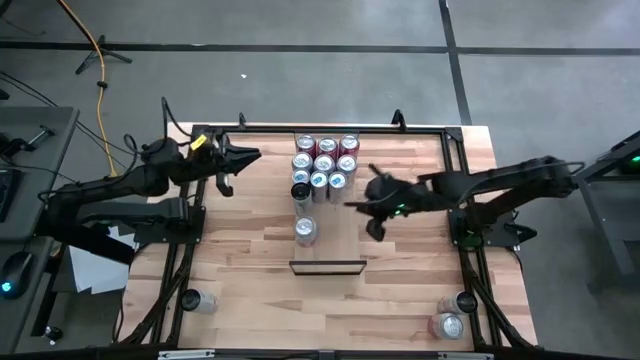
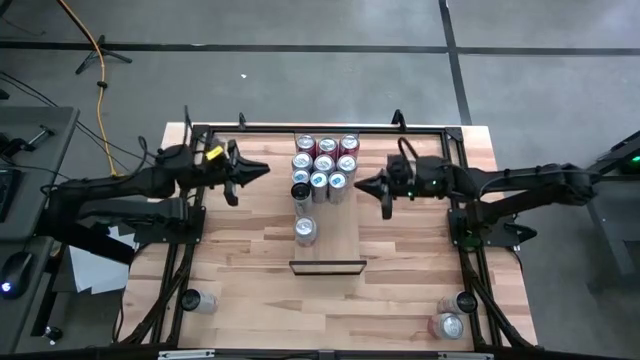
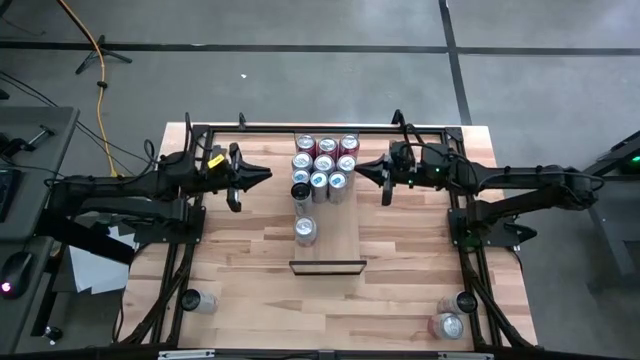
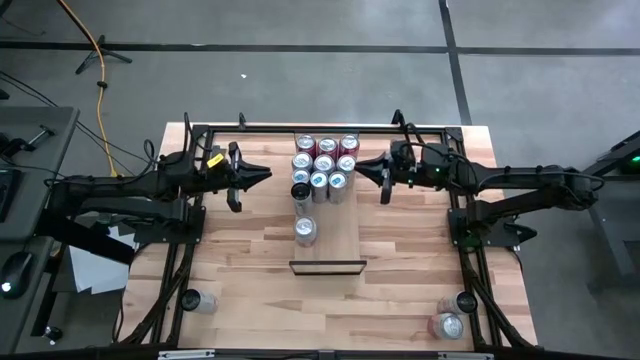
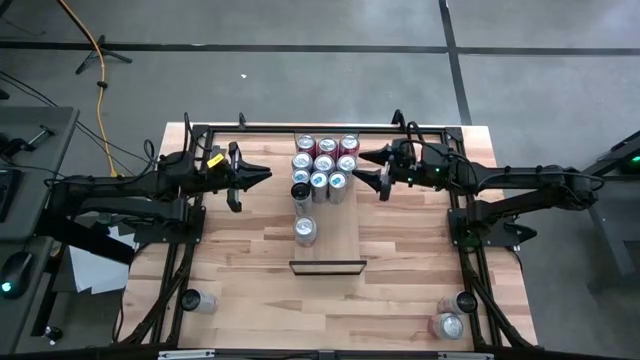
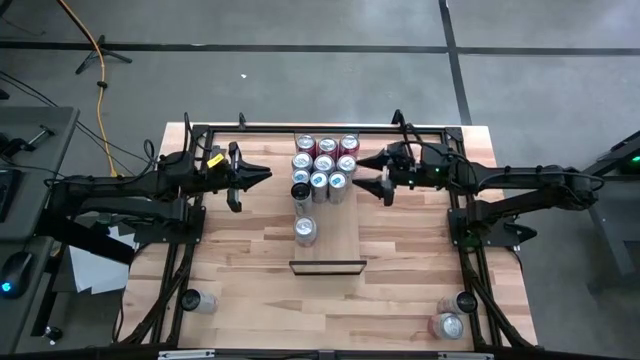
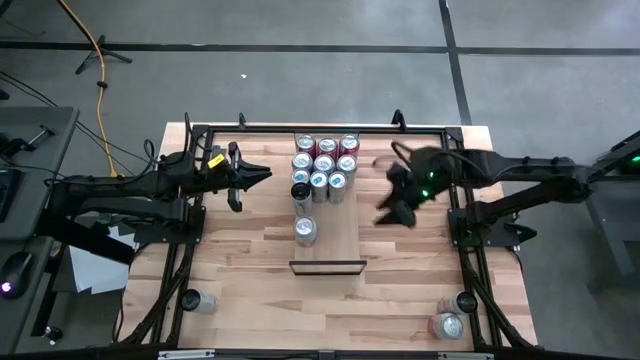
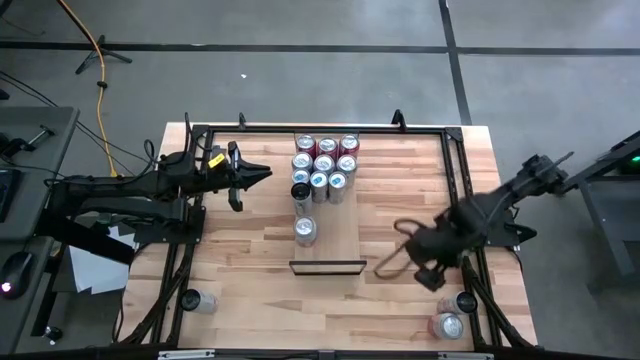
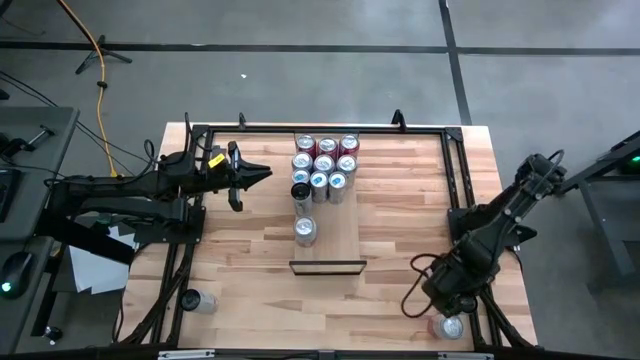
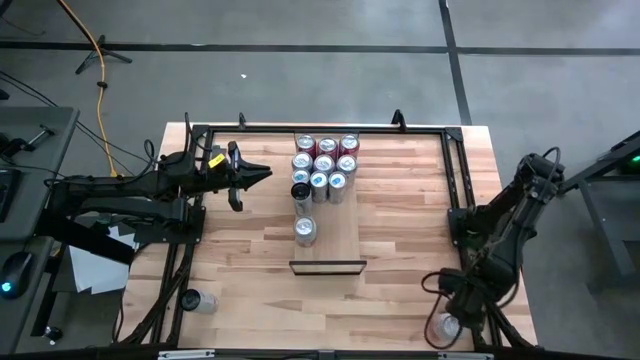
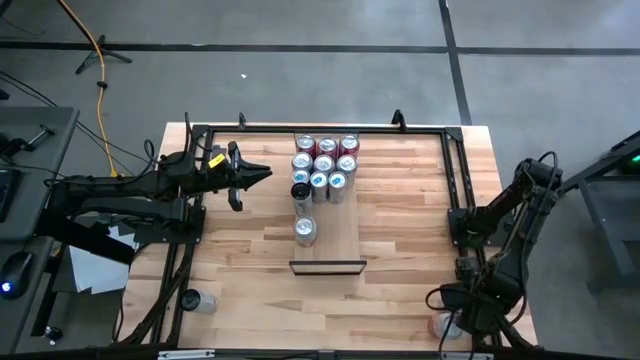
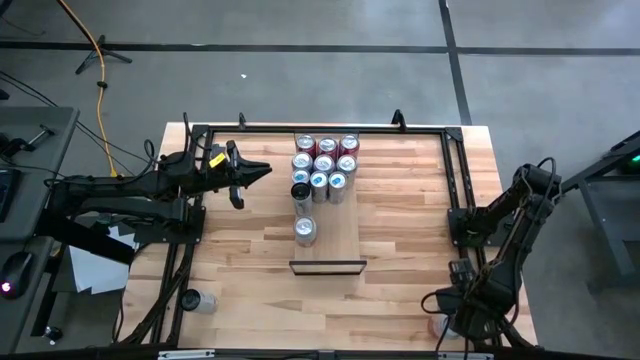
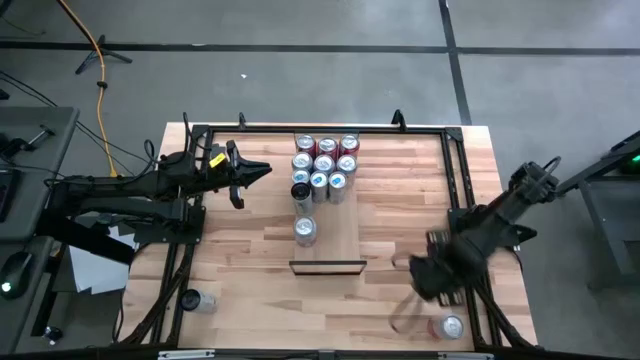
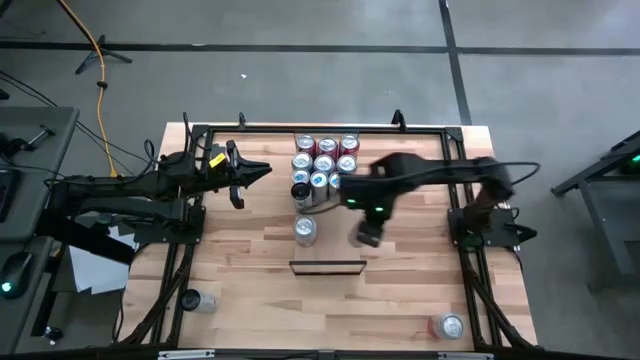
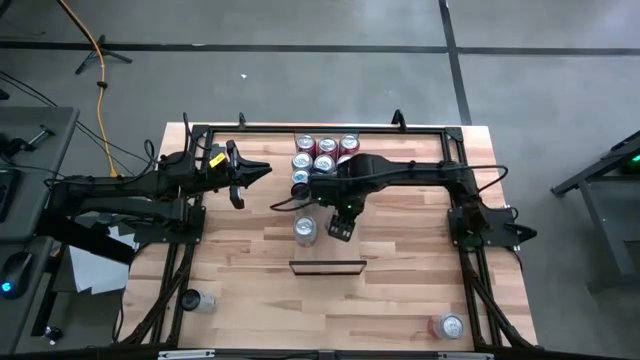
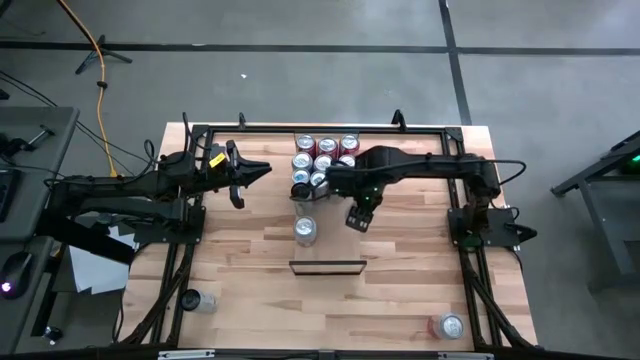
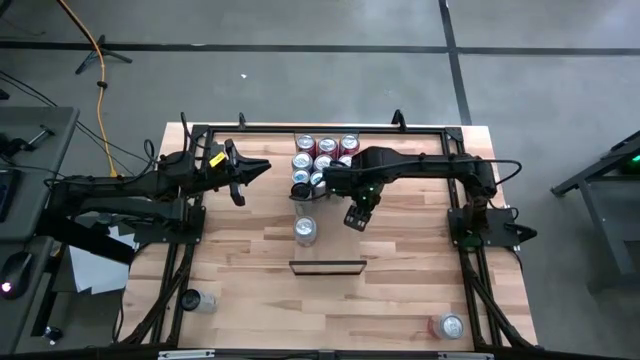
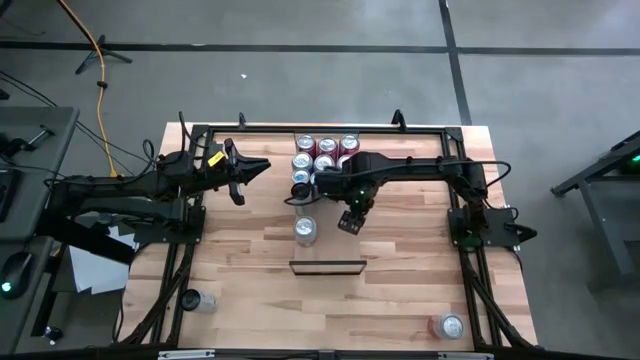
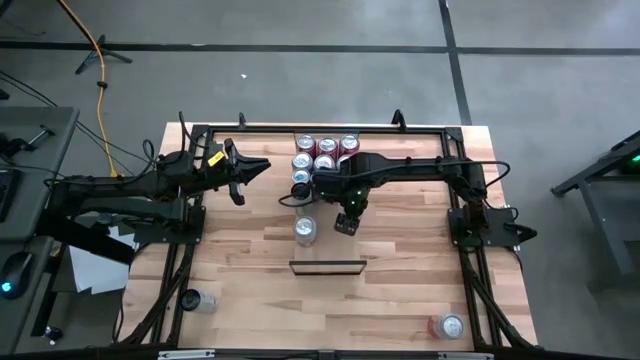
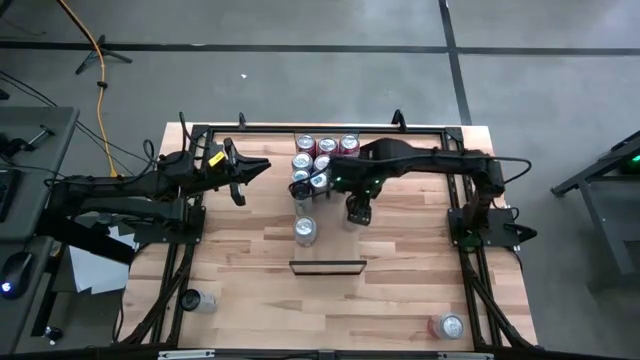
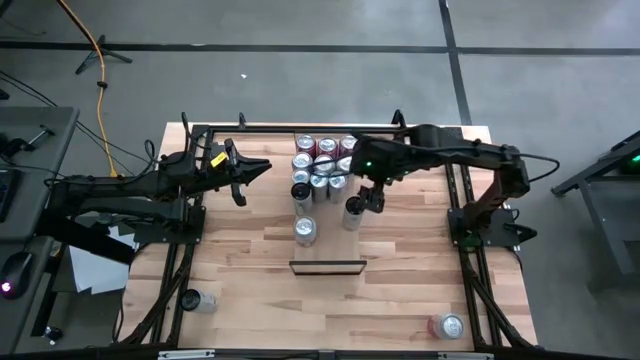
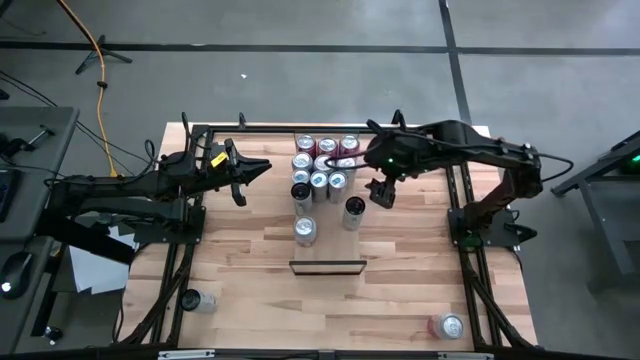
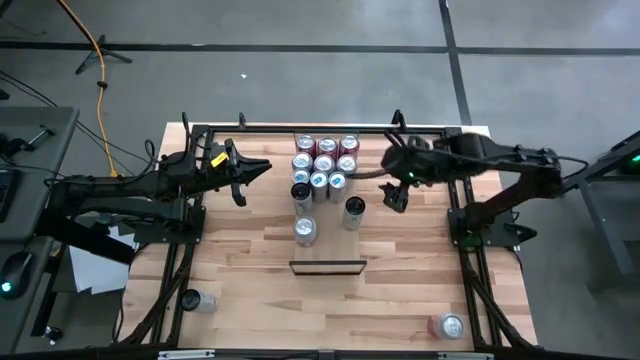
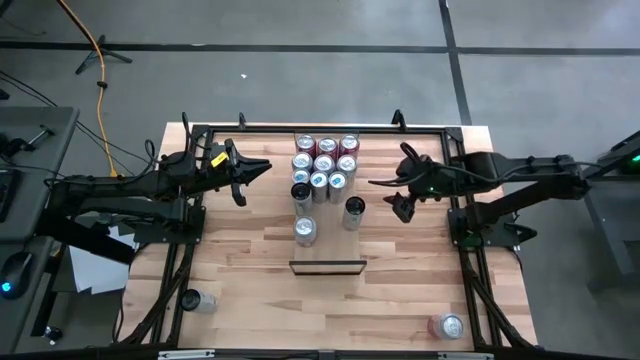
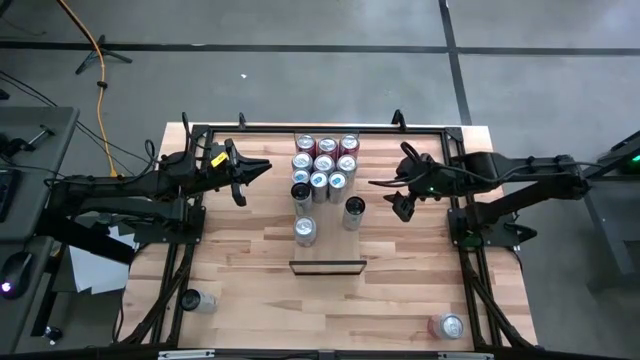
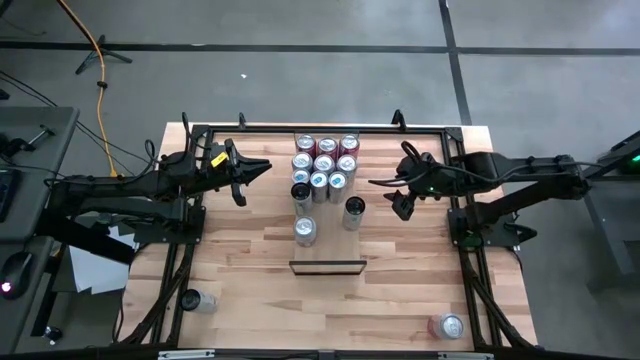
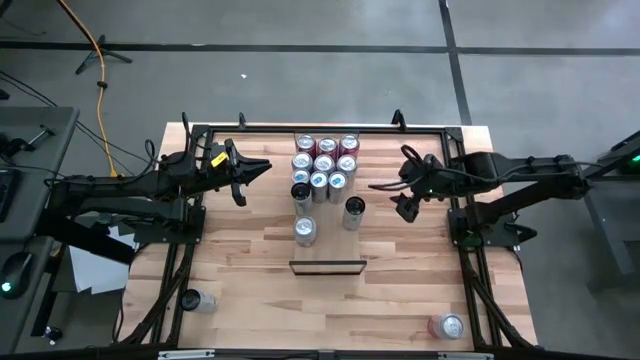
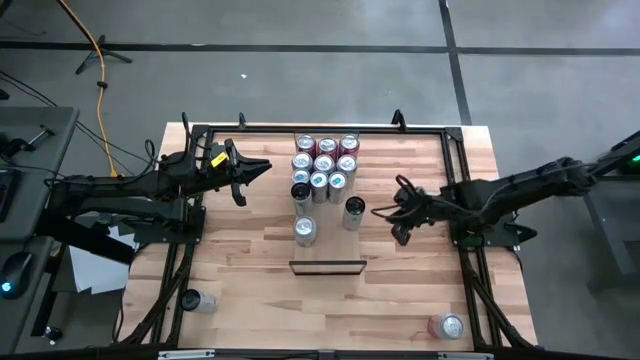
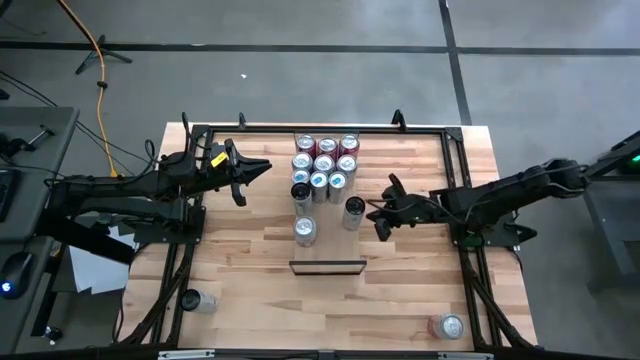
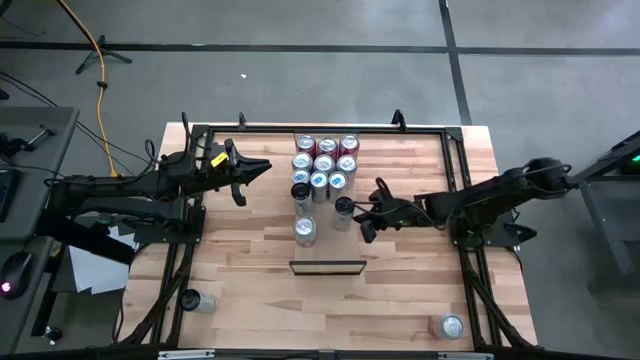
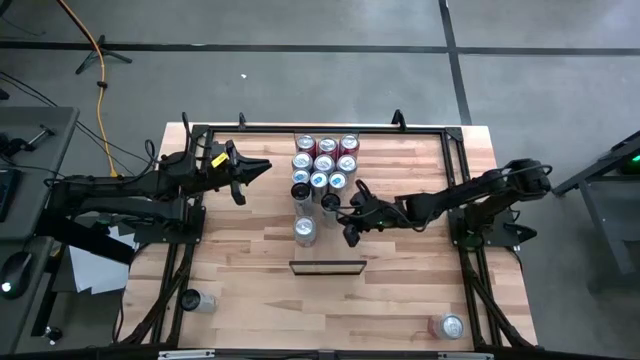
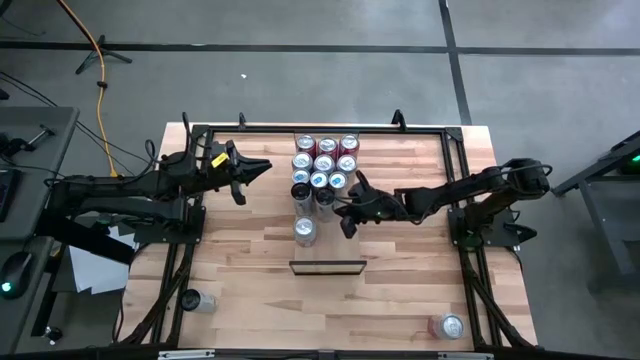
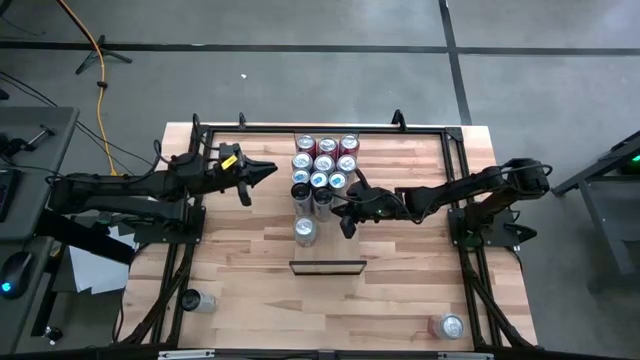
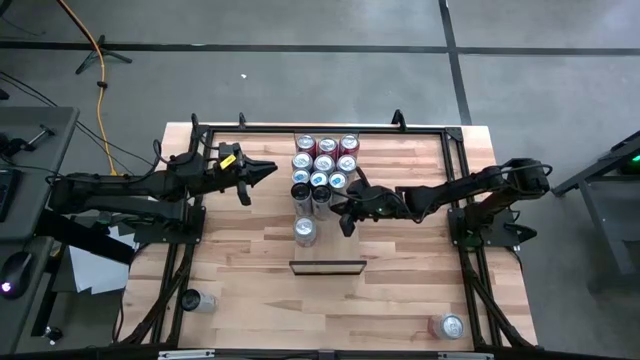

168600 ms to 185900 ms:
Task: Place canned beverage on shelf
Put the right white pink soda can on the shelf aligned with the other white pink soda can

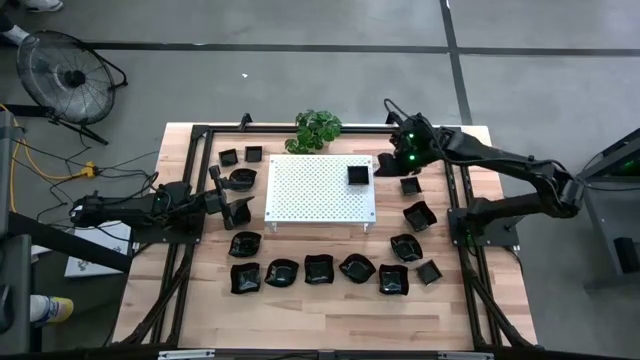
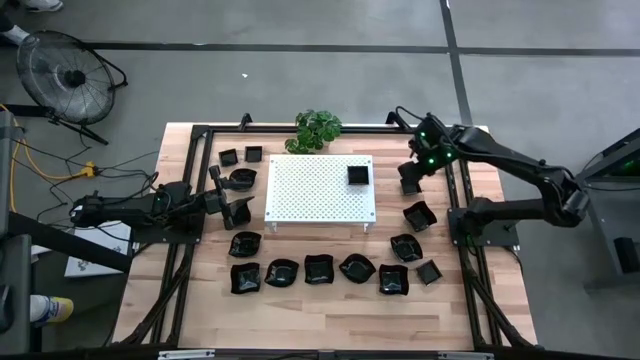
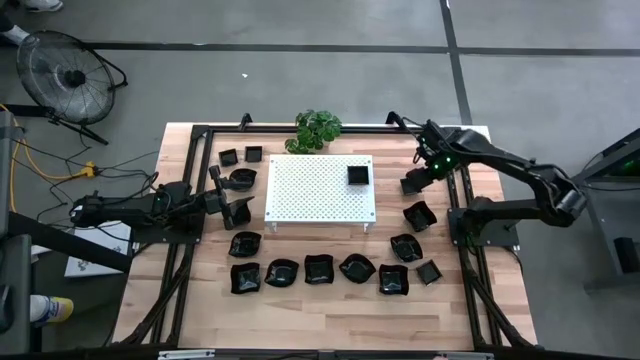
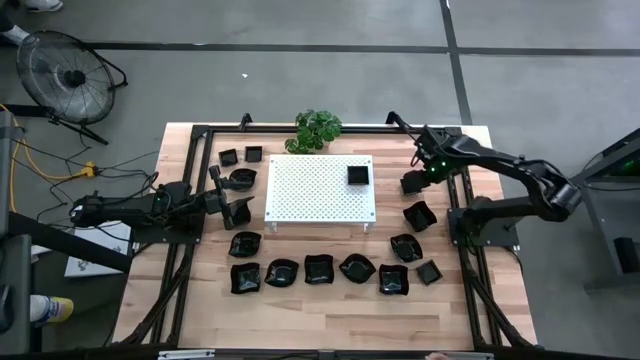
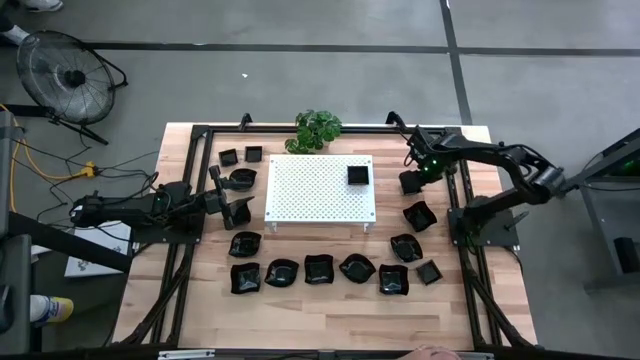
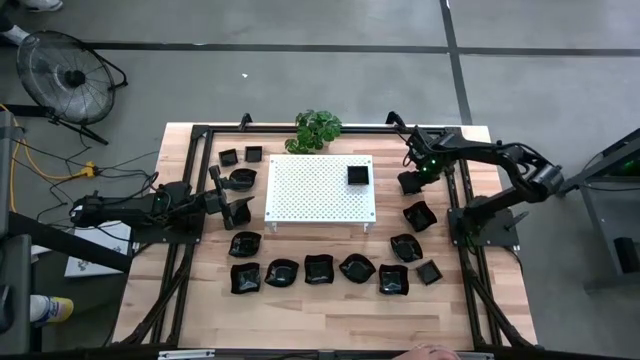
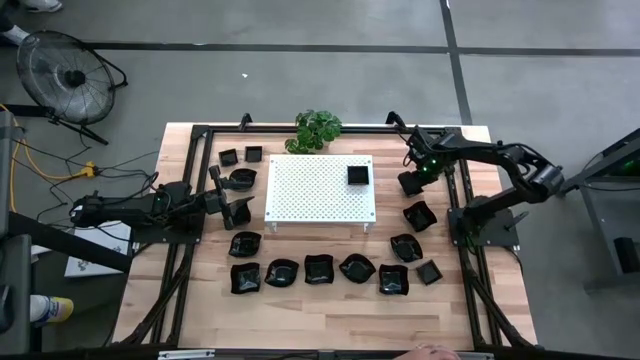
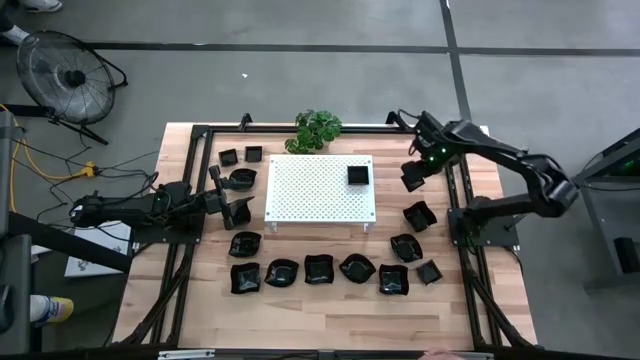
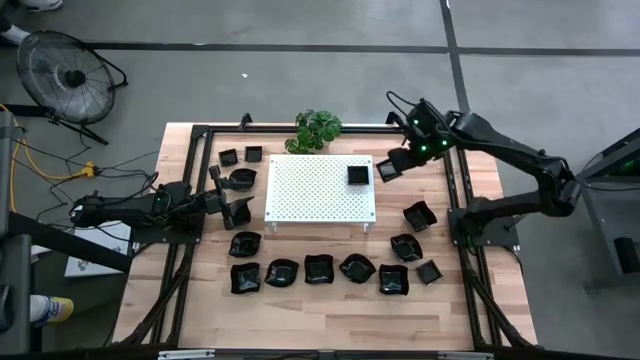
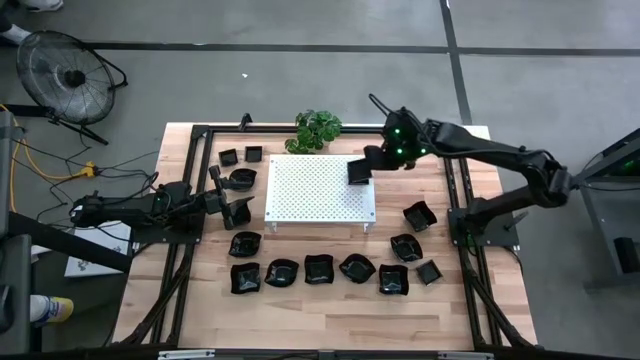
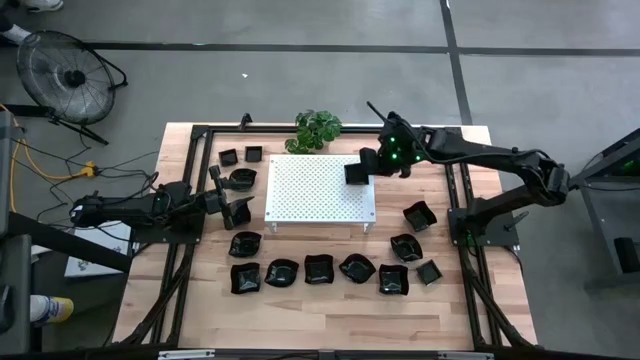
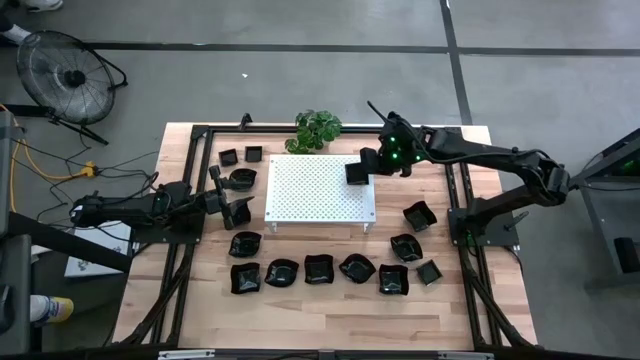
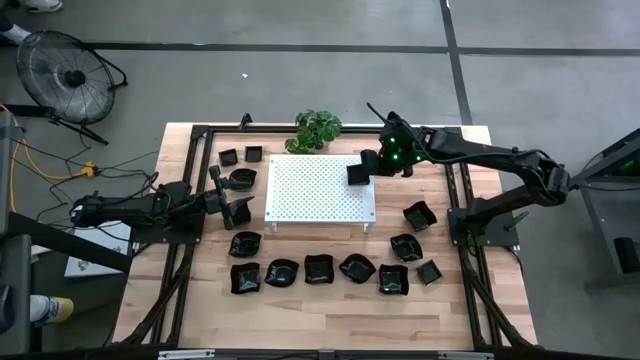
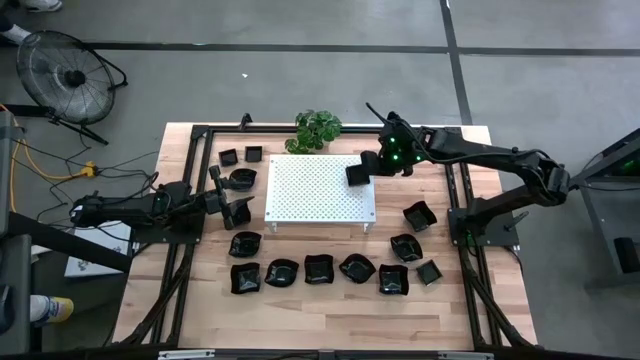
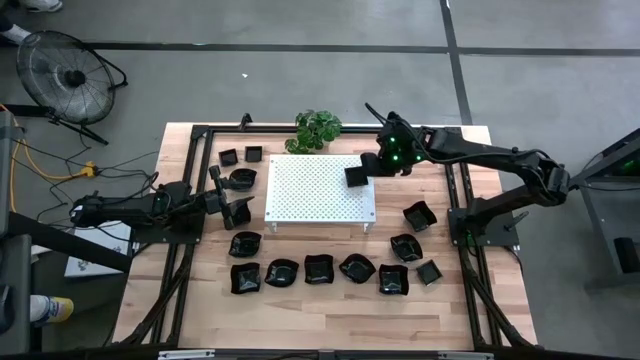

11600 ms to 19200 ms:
Task: Pick & Place Mini shaped plates
Stack the square plate on top of the square plate on the shelf
